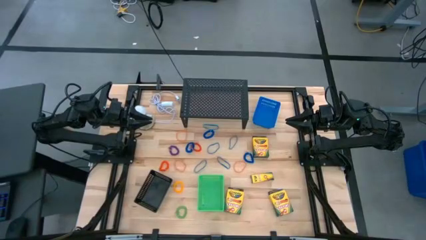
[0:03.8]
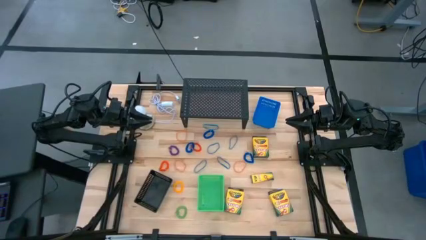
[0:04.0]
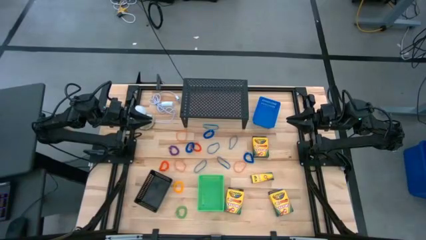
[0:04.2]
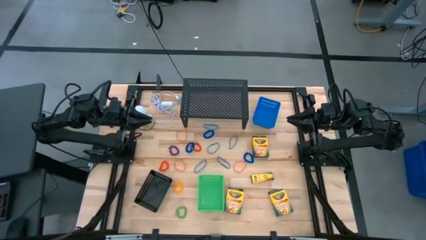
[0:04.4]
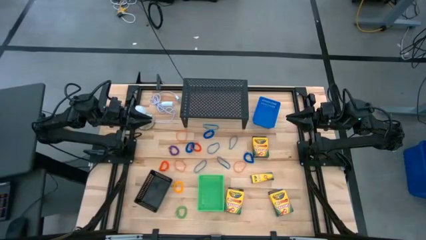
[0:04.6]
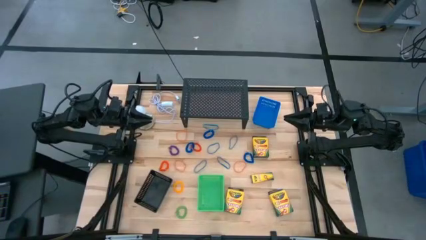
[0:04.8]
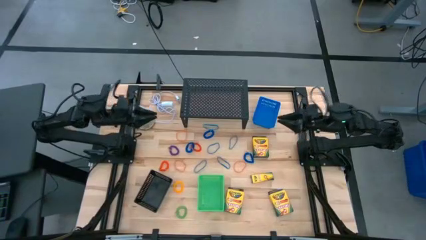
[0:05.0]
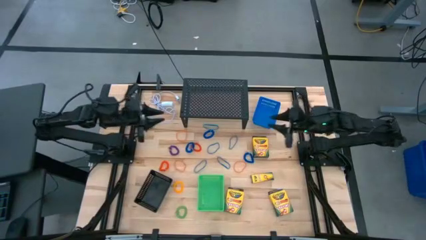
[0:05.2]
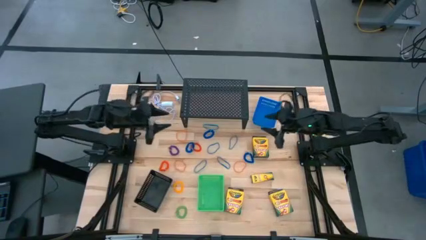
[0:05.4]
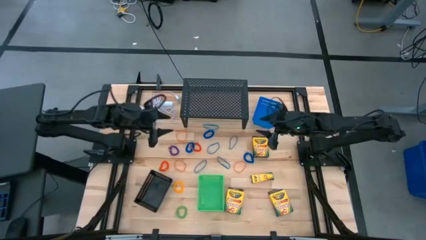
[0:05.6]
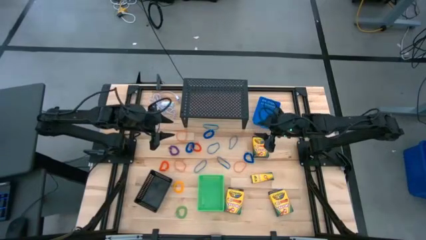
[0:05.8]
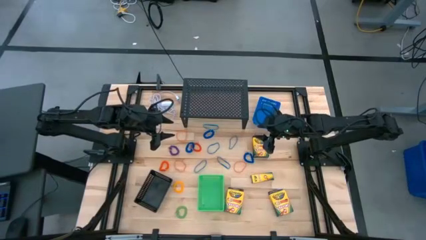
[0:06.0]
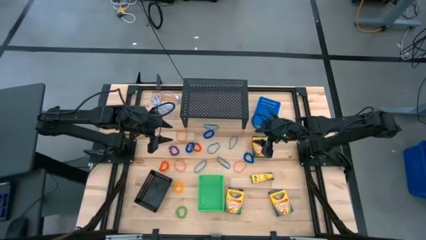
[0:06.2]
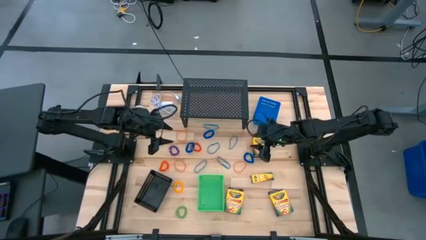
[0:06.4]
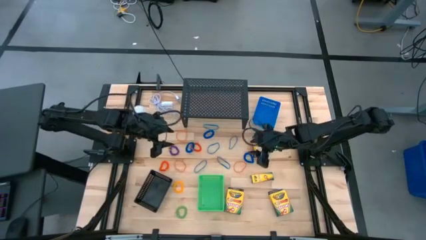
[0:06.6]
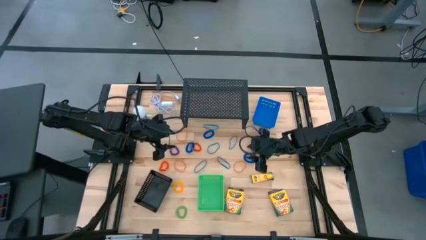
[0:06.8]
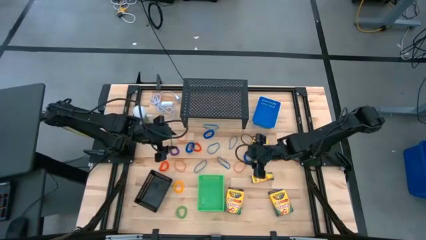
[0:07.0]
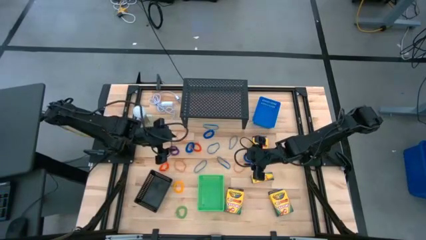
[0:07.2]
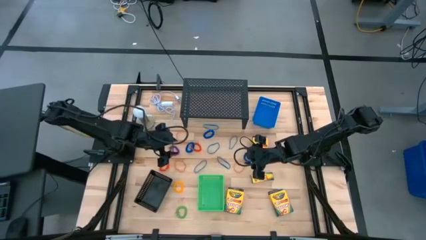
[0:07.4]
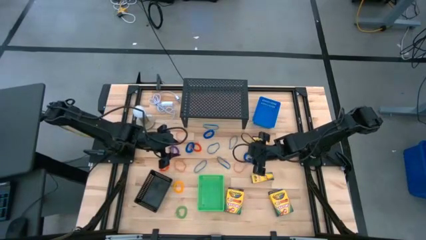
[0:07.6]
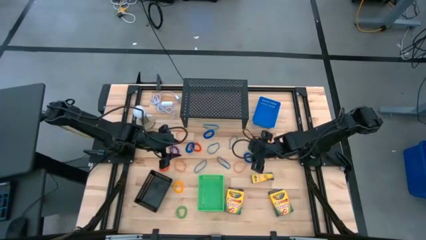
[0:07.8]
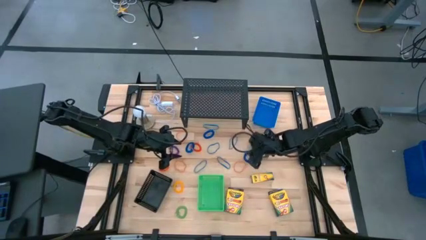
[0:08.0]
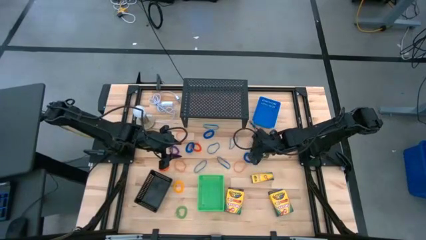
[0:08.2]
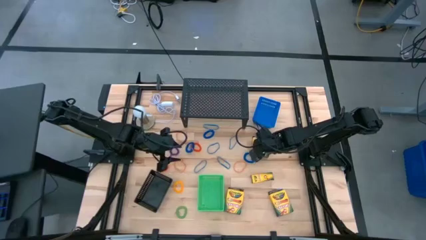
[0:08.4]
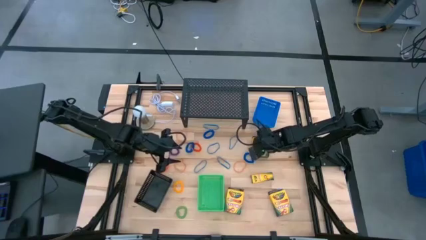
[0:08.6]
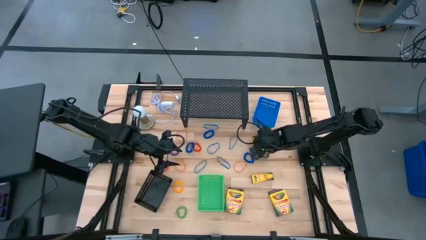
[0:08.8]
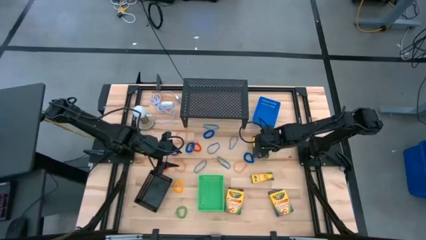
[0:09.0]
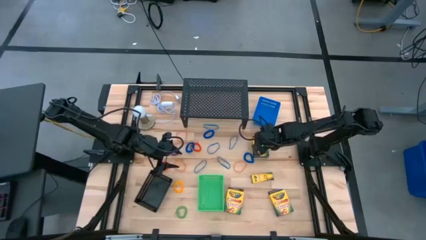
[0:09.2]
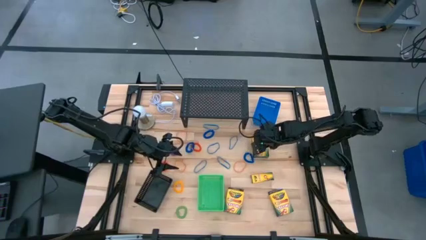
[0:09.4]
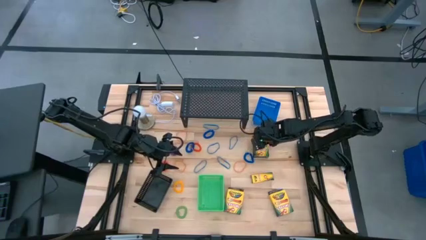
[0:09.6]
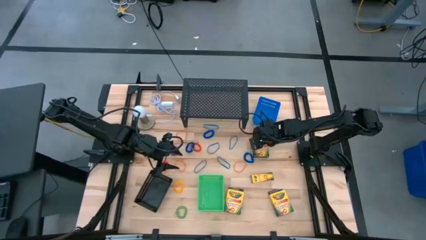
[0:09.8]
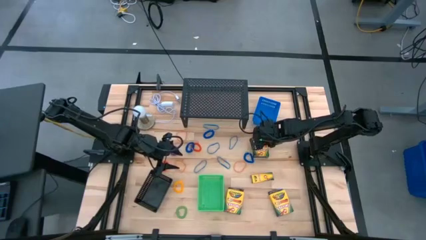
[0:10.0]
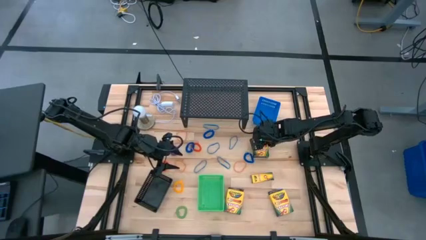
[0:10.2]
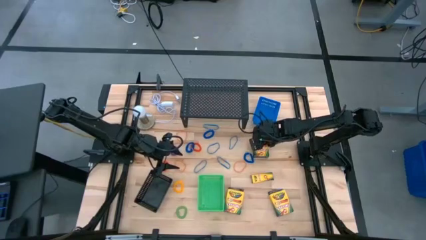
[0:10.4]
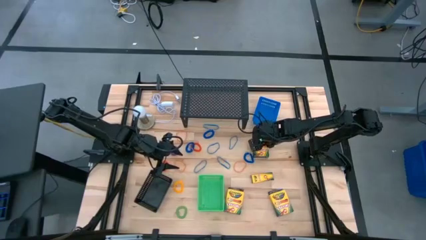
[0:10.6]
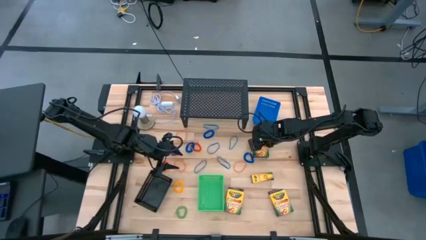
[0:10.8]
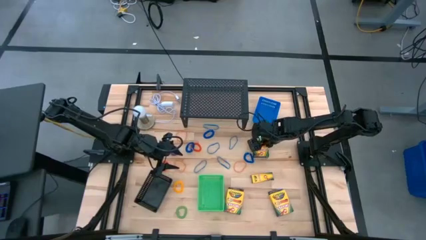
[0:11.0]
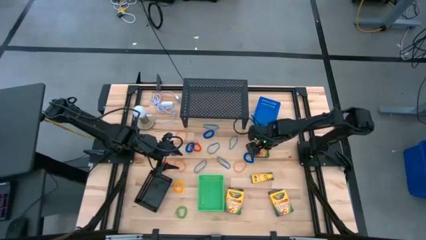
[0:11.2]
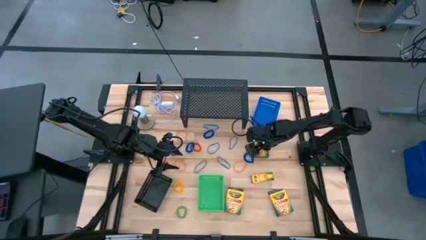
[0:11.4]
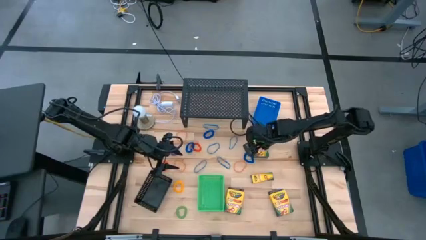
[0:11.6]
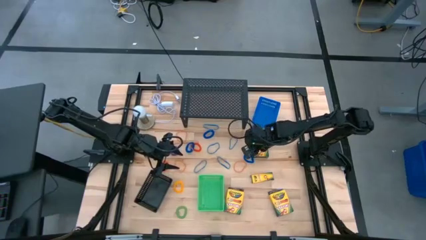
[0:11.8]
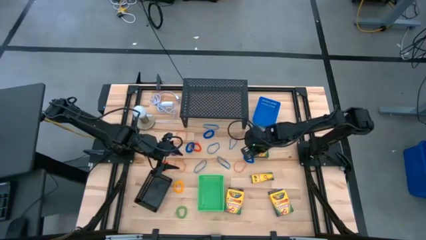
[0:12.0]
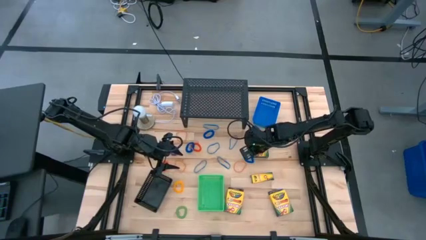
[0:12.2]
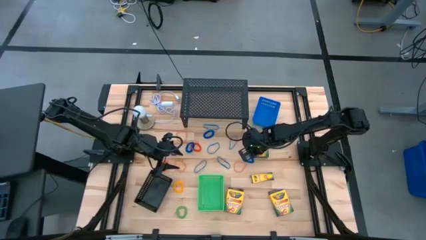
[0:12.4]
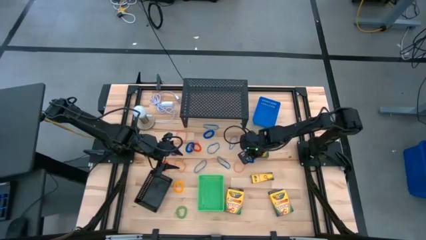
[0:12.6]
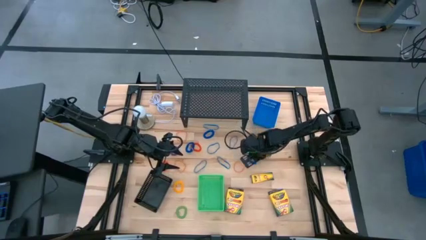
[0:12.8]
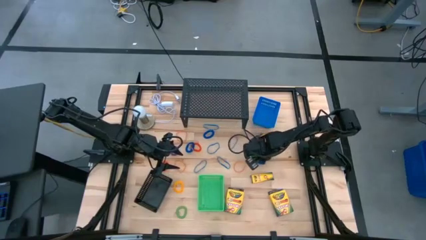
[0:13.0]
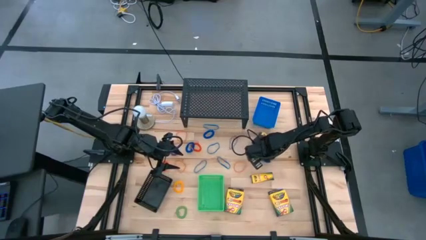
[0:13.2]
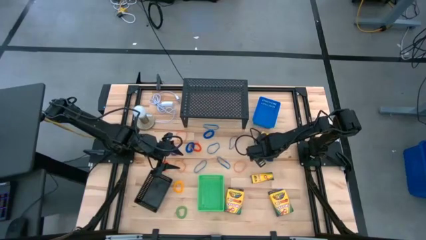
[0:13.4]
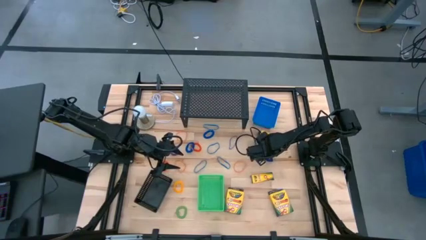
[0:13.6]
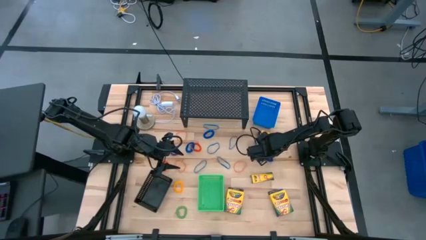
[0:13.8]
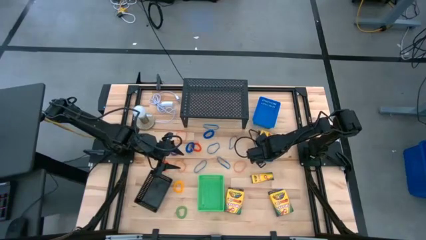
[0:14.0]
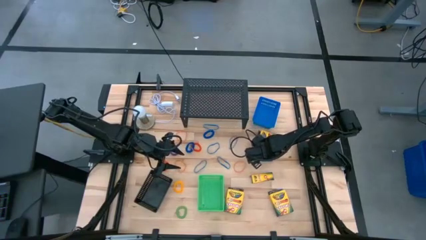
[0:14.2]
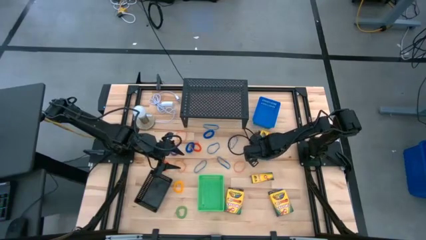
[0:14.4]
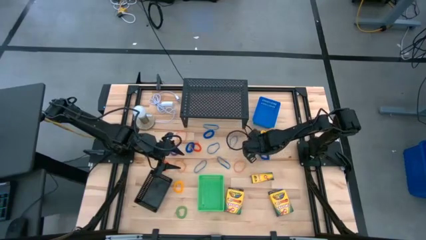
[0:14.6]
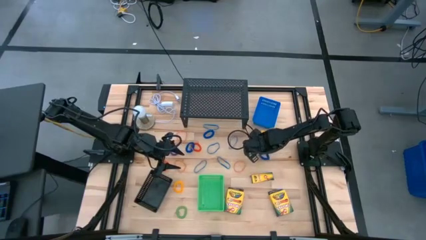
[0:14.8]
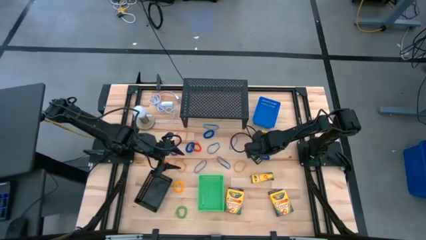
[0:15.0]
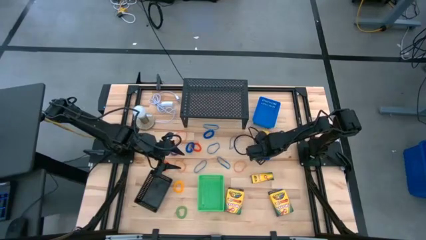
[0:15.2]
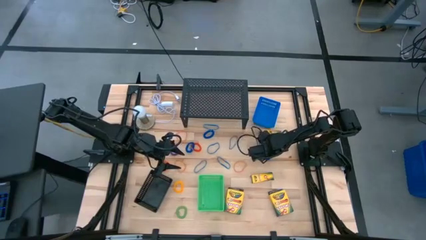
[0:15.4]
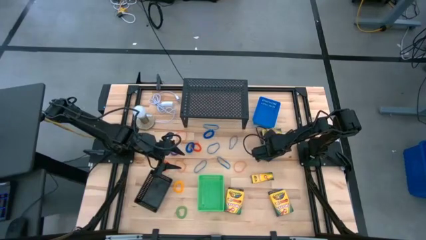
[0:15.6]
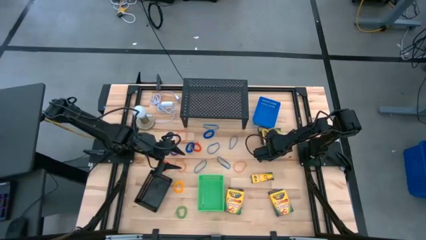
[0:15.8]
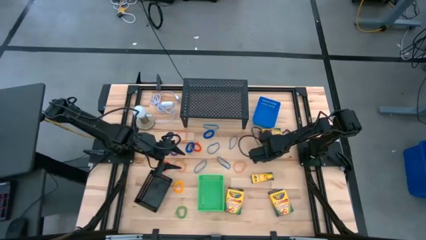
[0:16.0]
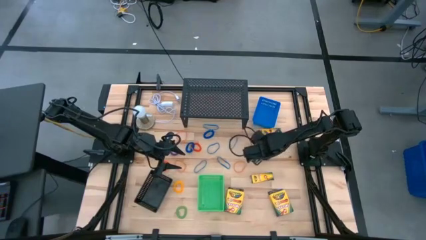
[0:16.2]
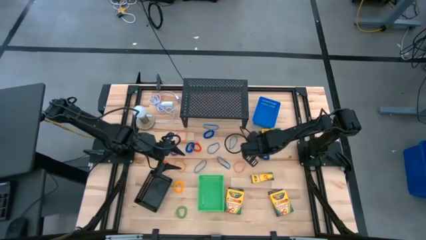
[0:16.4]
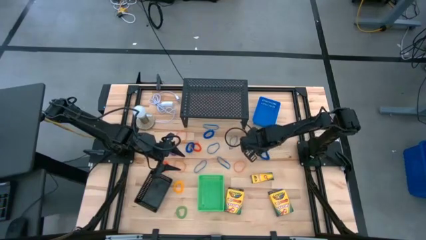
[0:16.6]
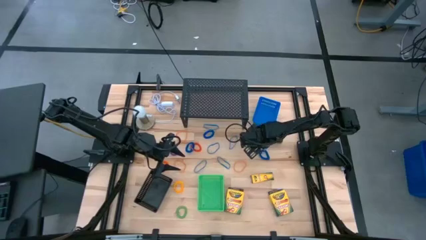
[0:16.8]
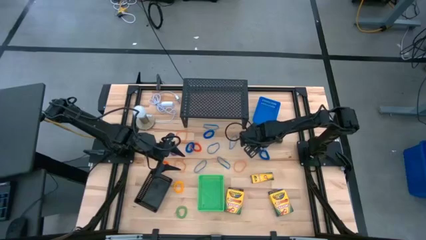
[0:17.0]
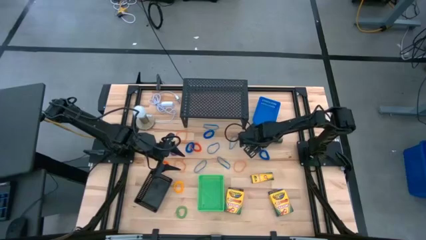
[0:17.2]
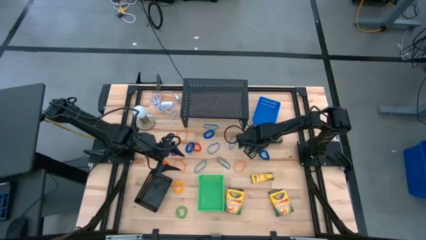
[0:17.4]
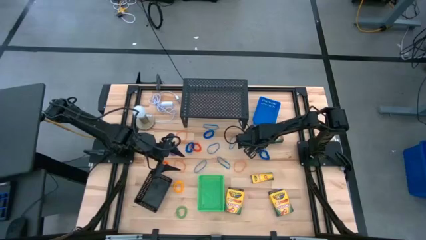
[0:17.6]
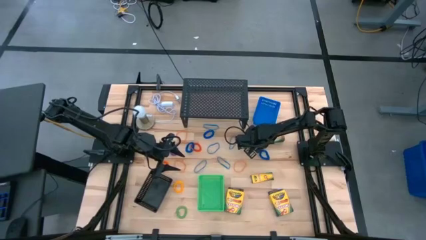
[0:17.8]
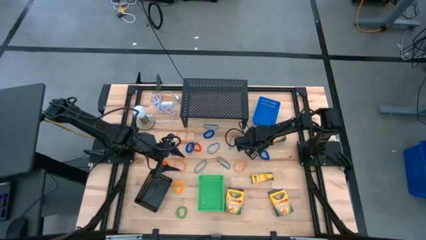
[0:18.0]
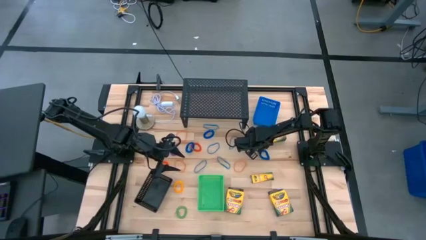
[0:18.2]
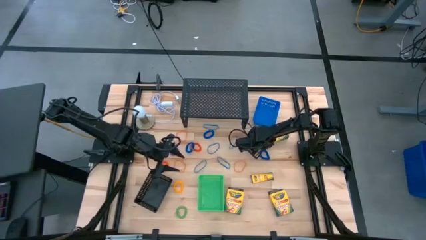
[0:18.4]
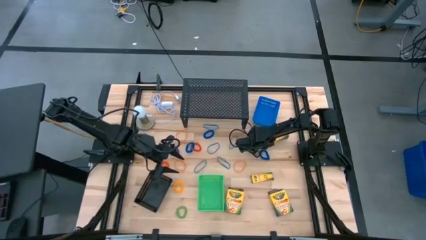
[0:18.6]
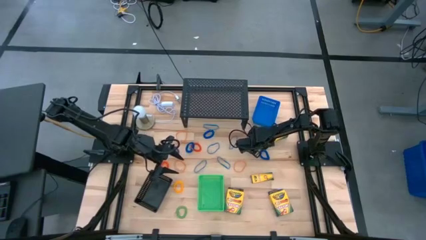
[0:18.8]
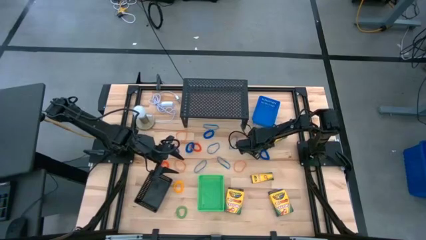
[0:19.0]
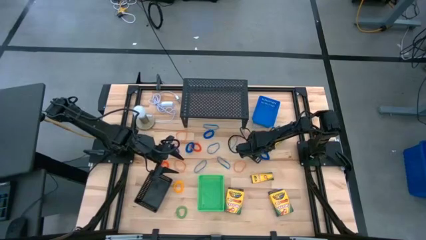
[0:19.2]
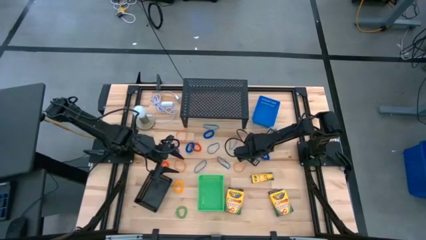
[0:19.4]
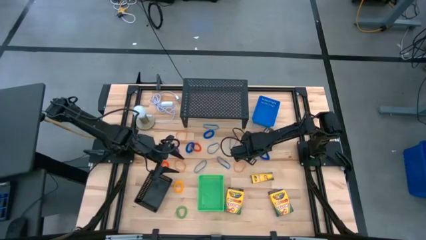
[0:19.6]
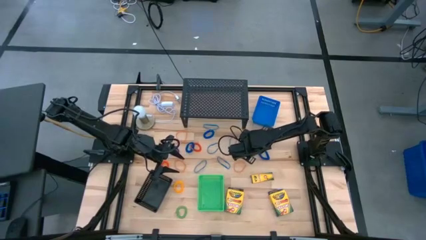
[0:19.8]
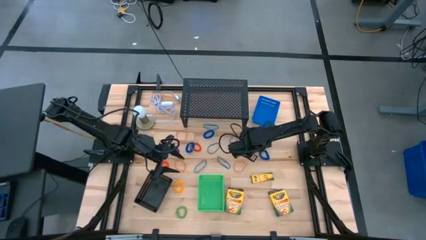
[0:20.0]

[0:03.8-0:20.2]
Task: Pick & Place Office Desk Supplies
Put the crayon box into the green bin
